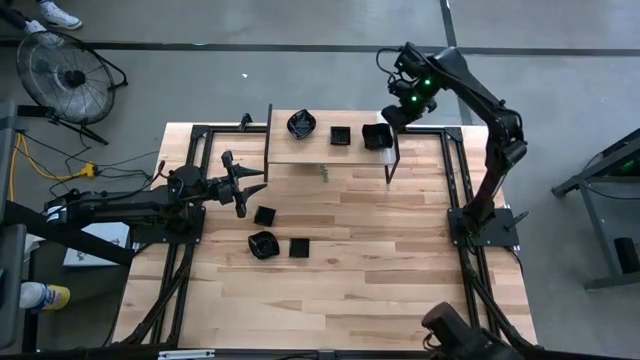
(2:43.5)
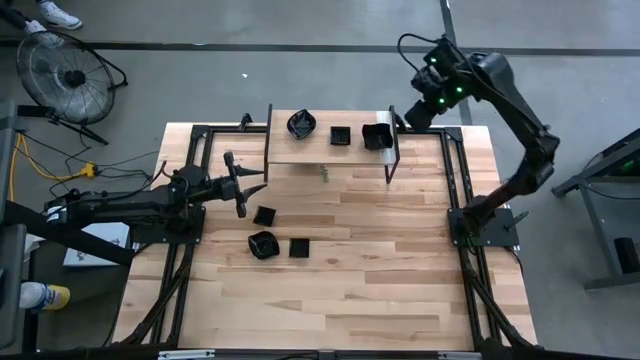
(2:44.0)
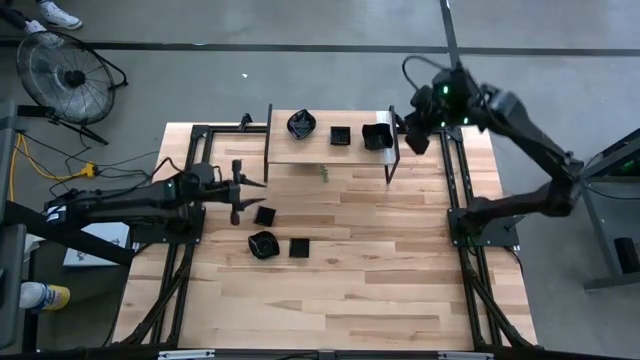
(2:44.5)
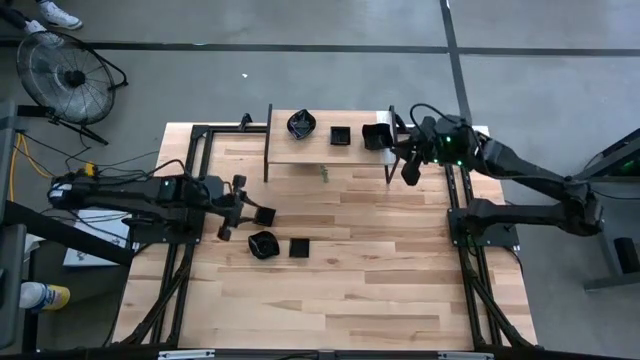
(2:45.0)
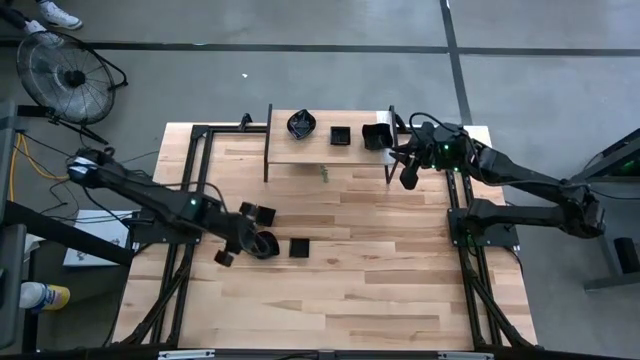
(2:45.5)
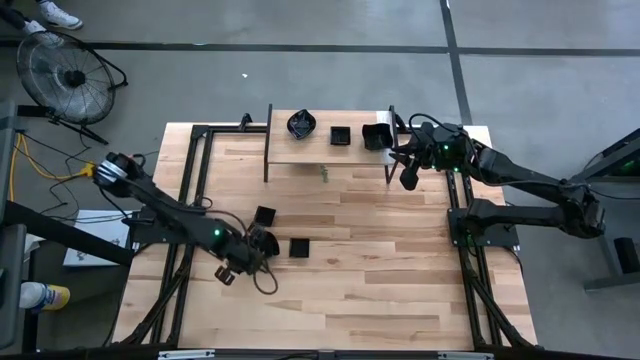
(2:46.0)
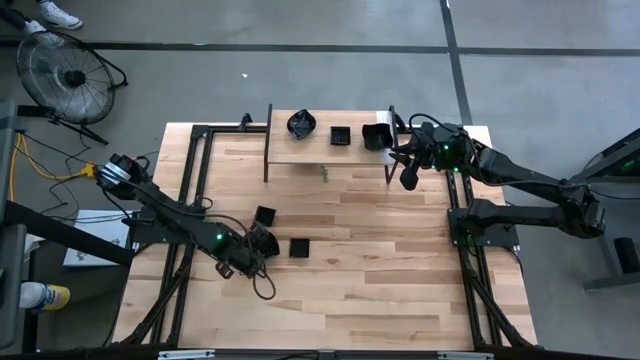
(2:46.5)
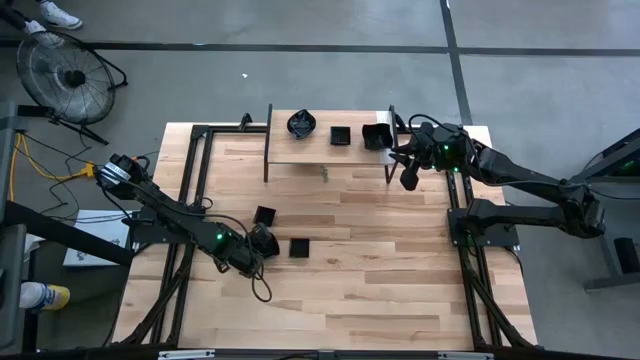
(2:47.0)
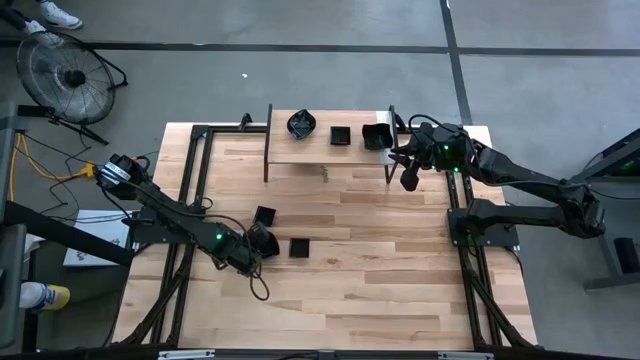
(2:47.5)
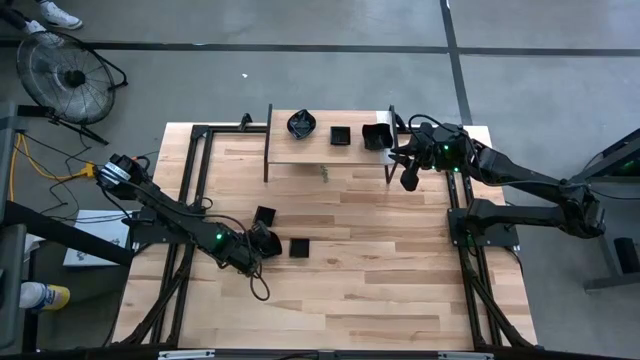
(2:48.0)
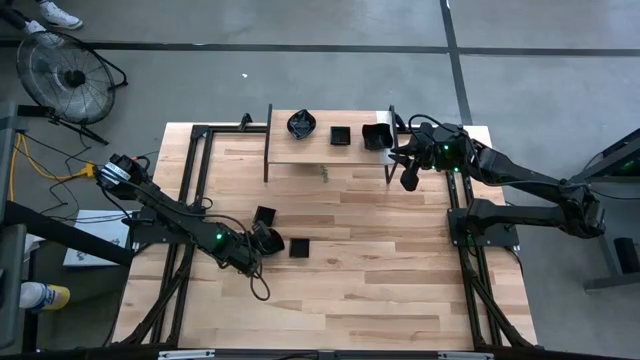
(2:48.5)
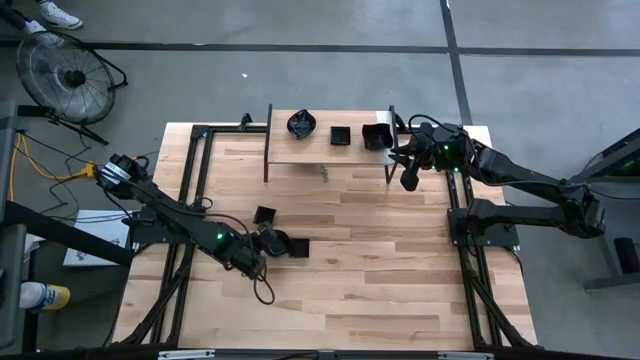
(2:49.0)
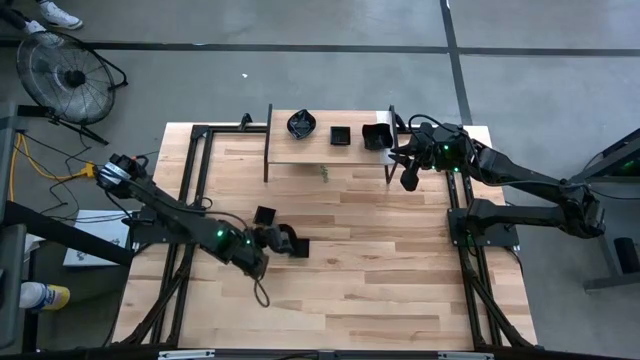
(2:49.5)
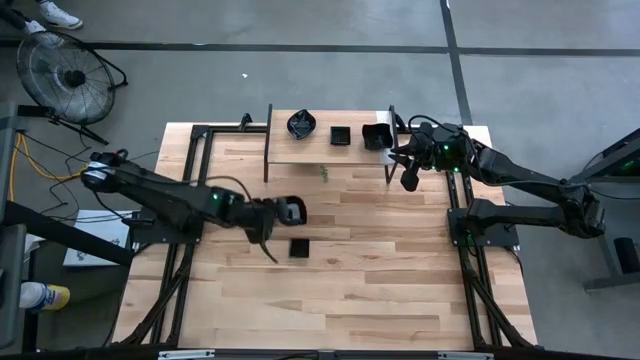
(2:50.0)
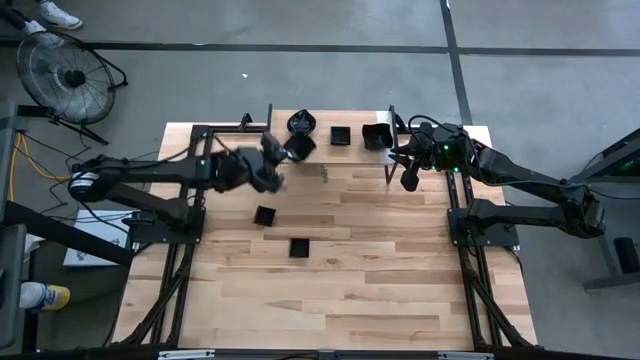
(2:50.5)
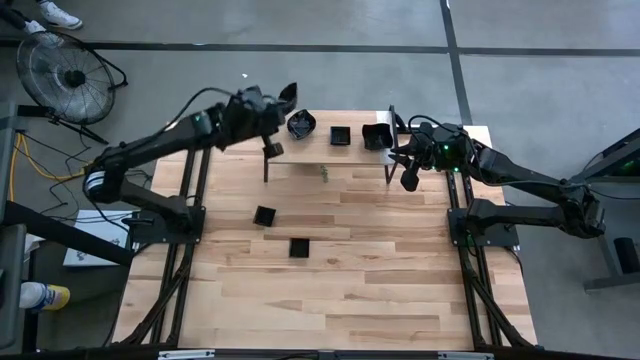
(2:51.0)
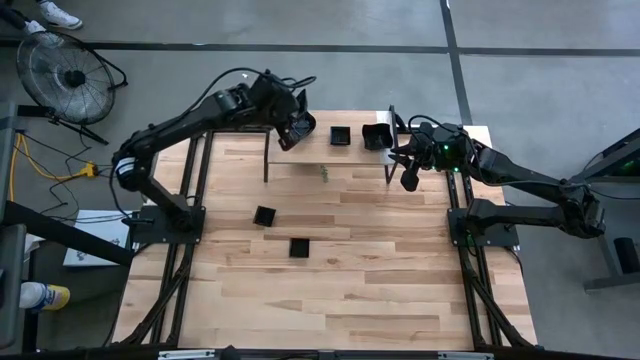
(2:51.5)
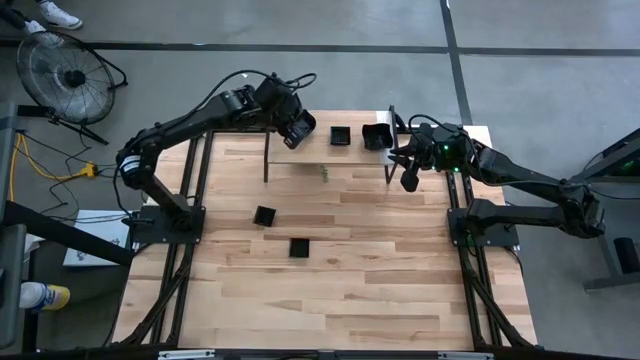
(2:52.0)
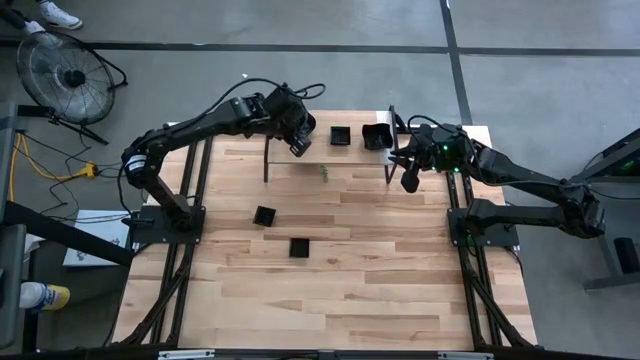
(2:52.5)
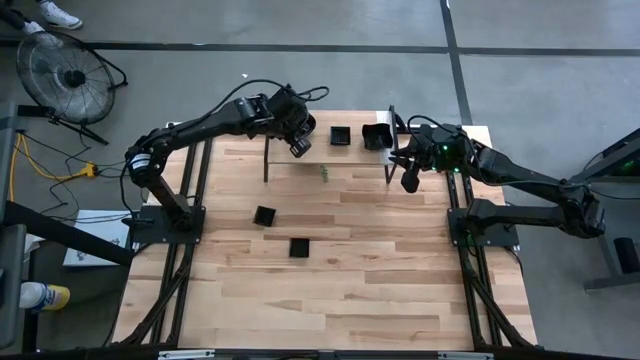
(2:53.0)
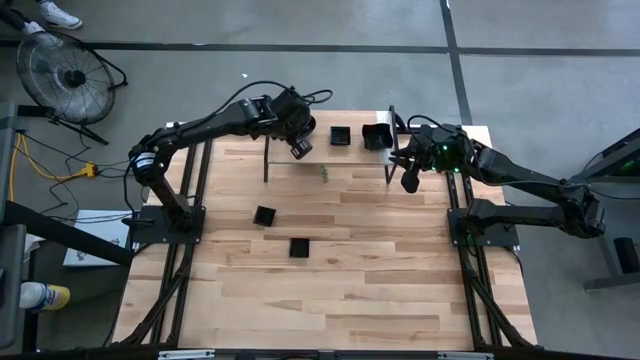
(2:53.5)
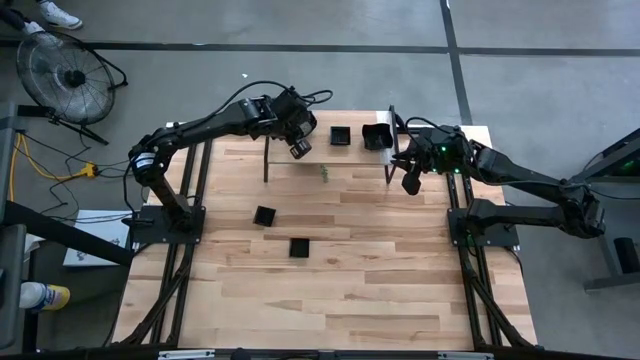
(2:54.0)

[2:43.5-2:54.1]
Task: Pick & Place Mini shaped plates
Stack the leaf shaped plate on top of the other leaf shaped plate on the shelf

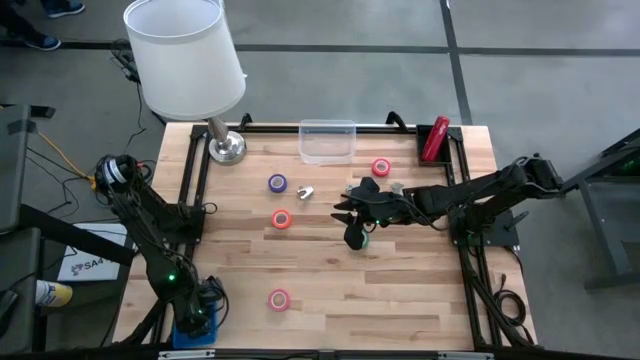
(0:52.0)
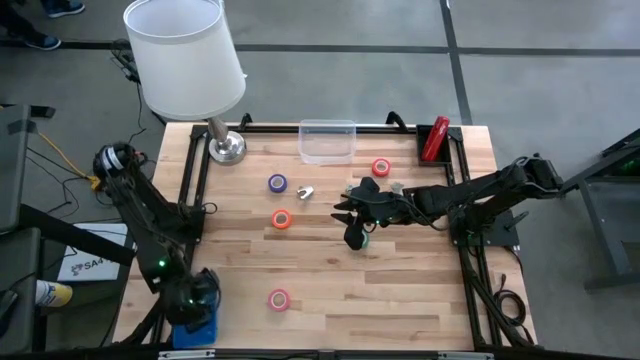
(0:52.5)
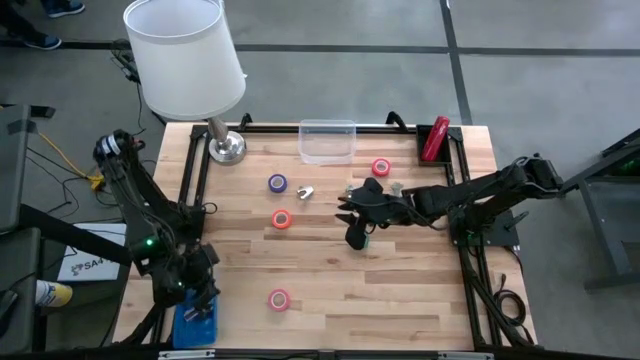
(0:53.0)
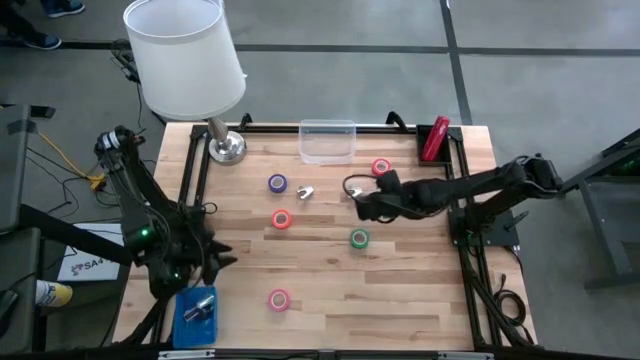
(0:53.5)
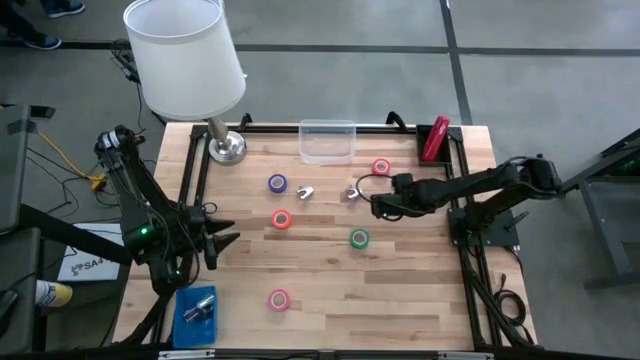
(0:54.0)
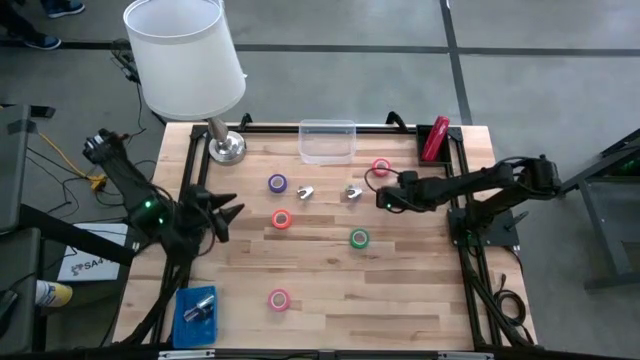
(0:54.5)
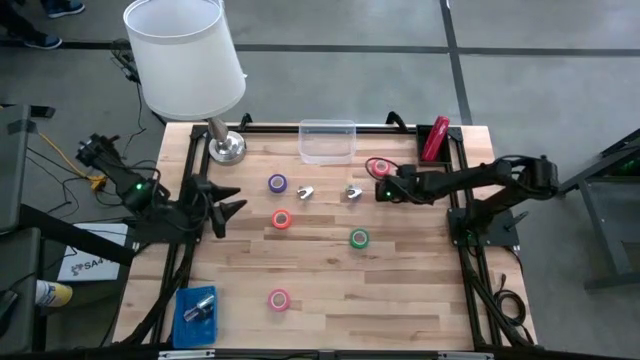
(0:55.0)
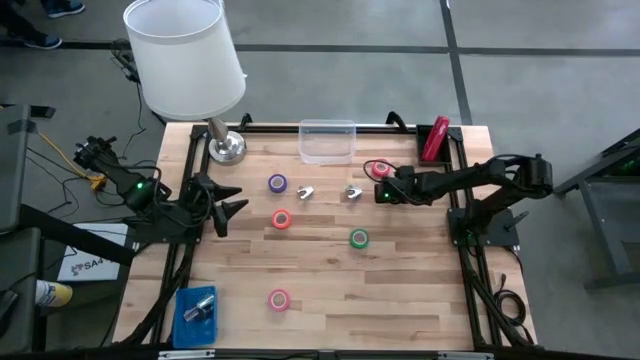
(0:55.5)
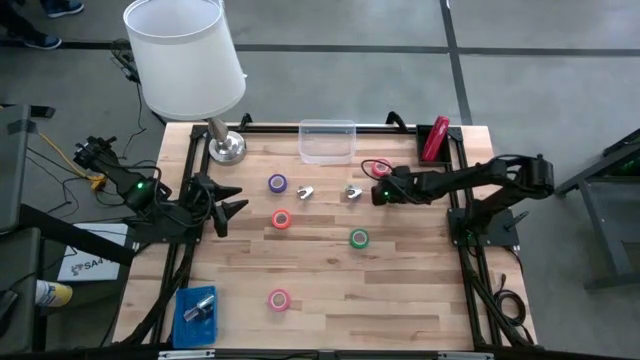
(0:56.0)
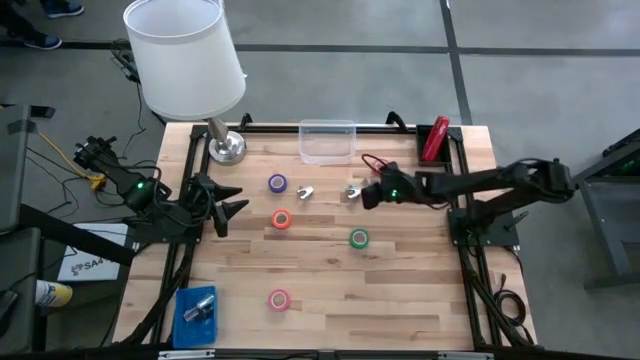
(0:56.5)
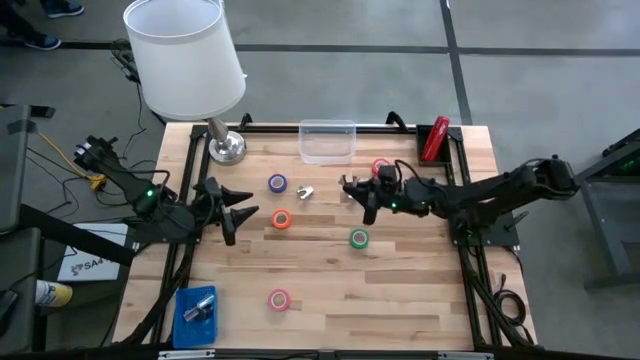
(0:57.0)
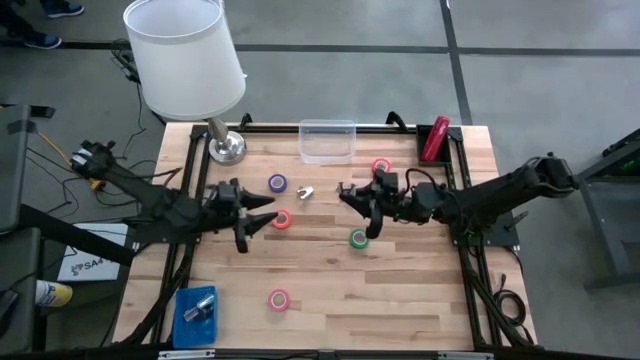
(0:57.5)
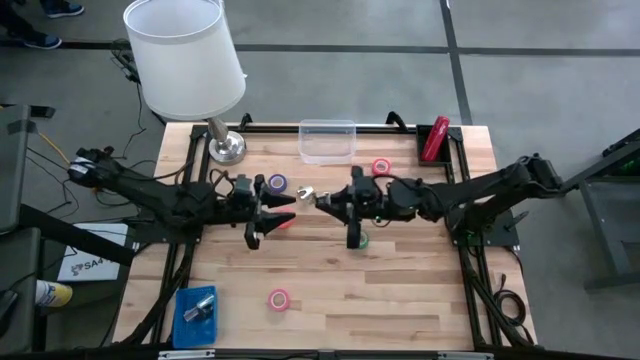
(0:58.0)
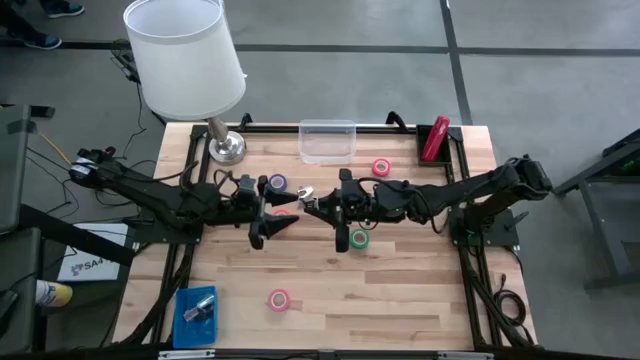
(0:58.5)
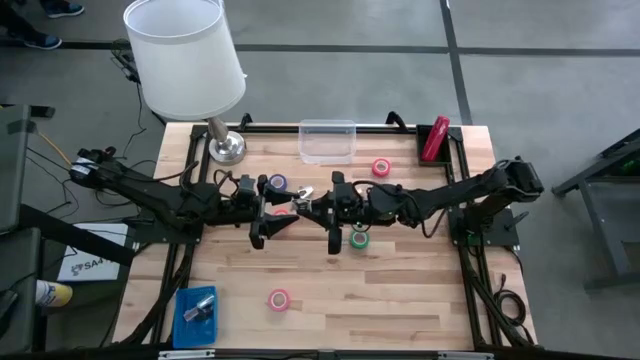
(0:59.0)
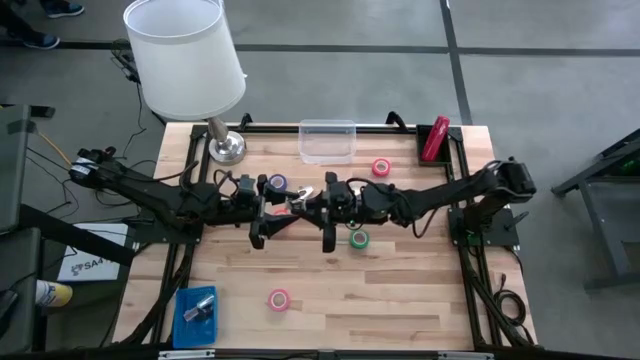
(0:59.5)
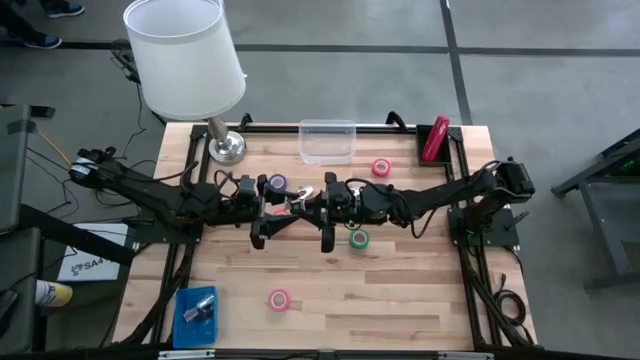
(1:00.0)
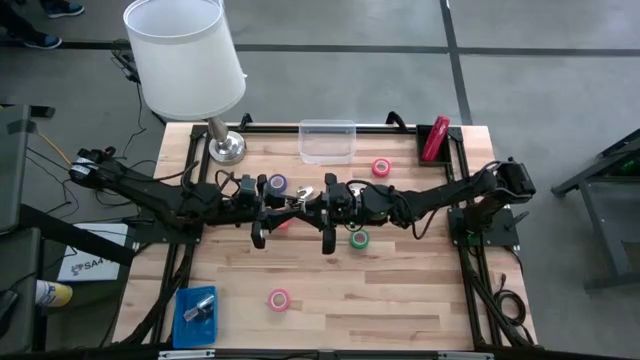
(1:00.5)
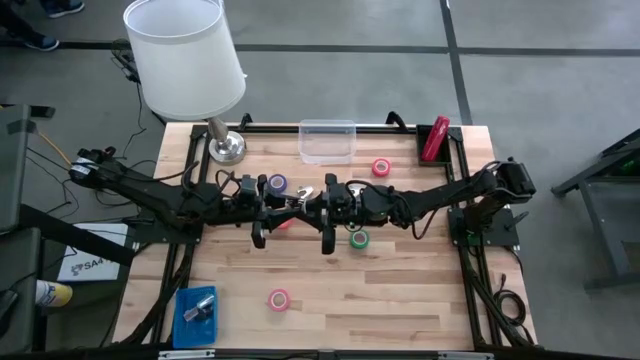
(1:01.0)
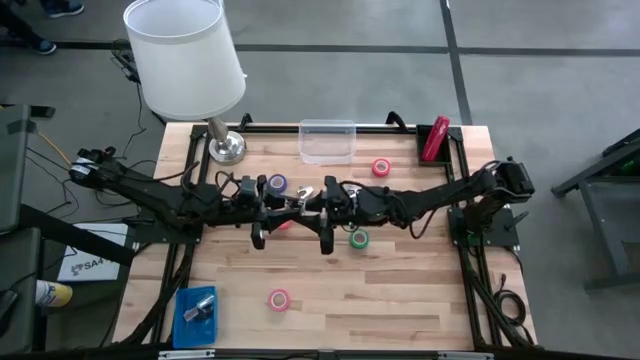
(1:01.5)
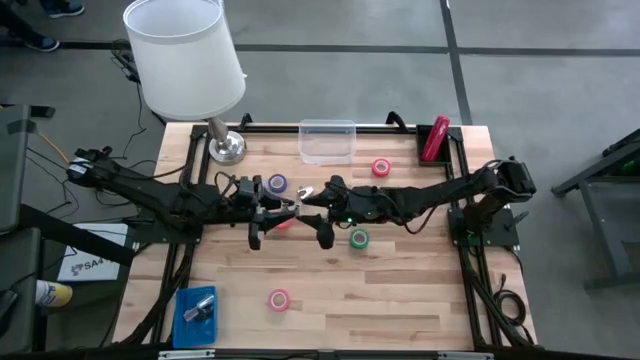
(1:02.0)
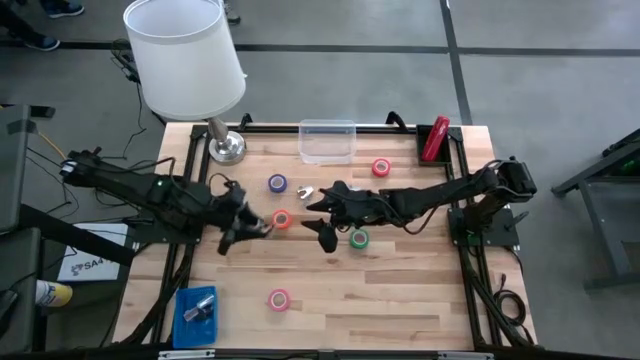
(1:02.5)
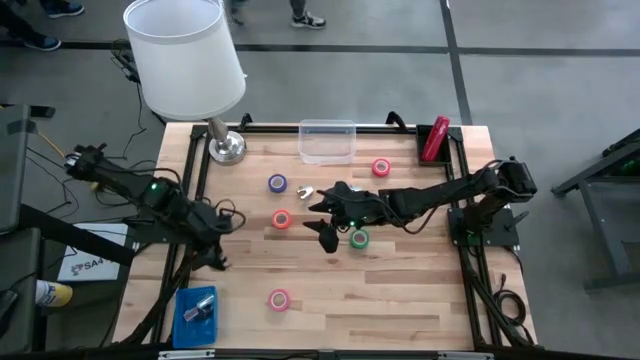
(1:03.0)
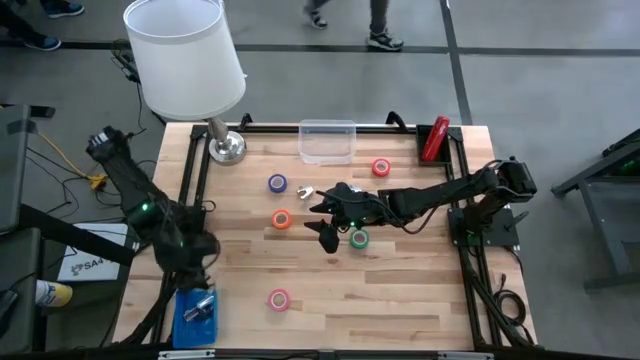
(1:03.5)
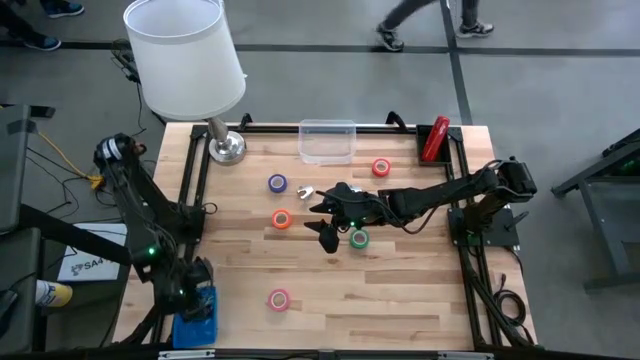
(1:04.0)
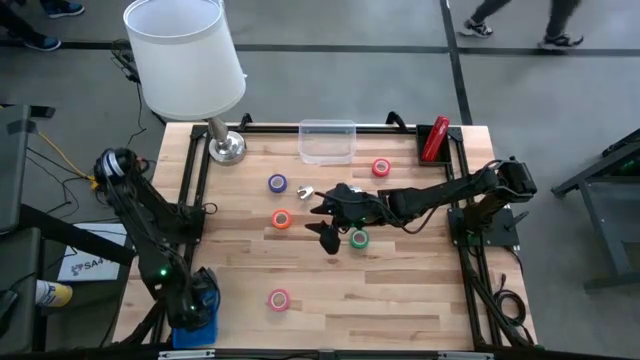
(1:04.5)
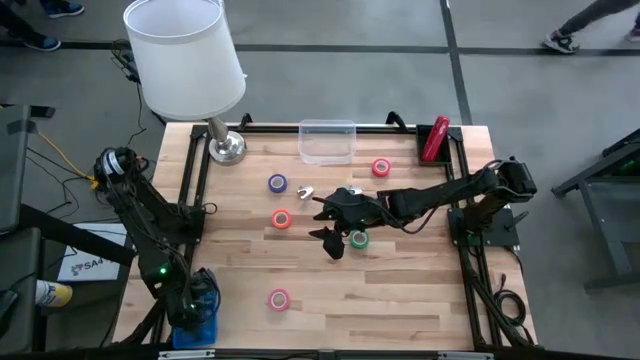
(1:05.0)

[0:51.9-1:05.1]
Task: Pick and place Stapler, Stapler remover, tape
Put the gray staple remover into the blue bin
